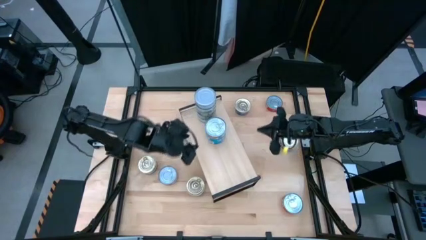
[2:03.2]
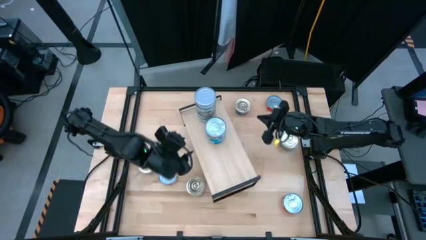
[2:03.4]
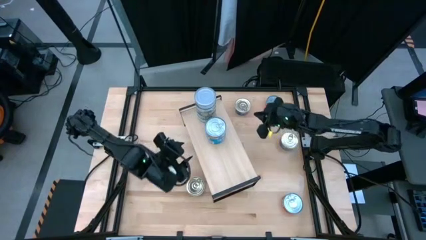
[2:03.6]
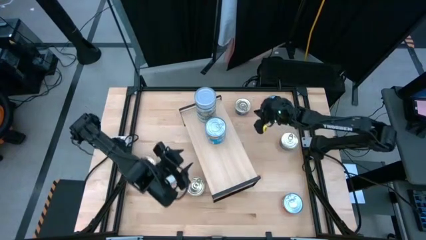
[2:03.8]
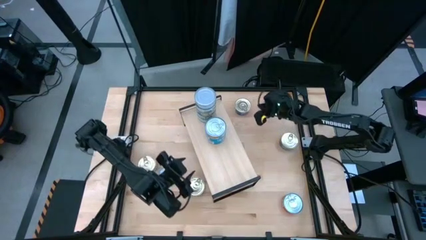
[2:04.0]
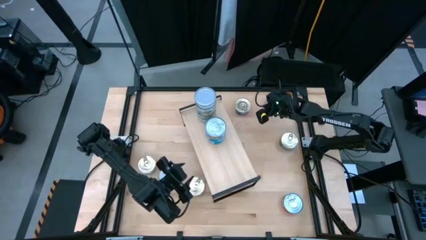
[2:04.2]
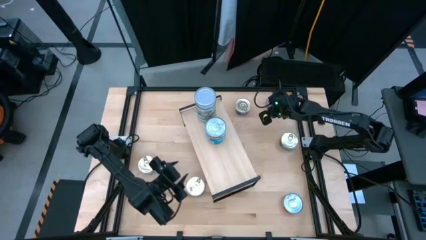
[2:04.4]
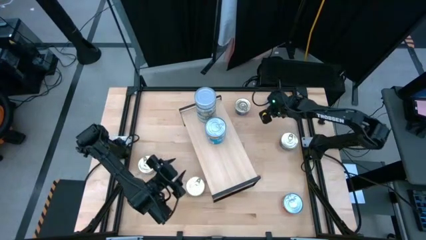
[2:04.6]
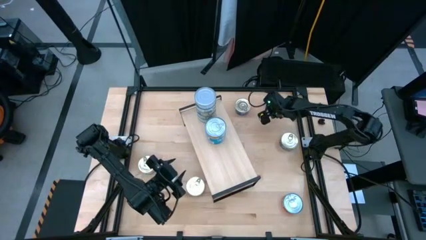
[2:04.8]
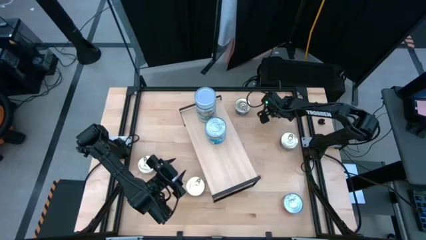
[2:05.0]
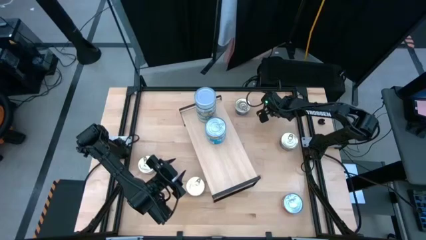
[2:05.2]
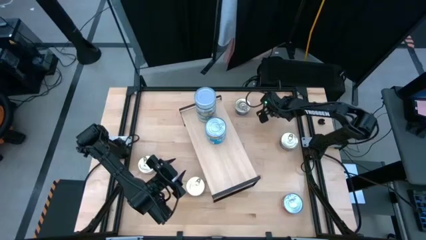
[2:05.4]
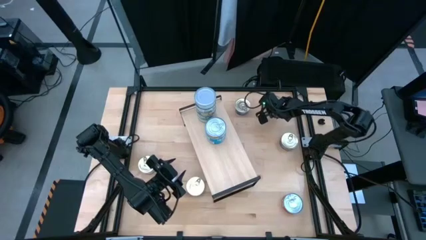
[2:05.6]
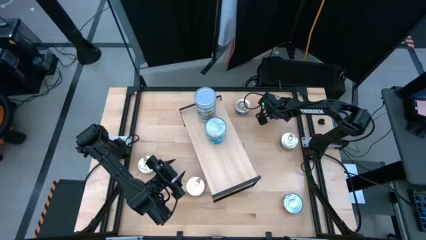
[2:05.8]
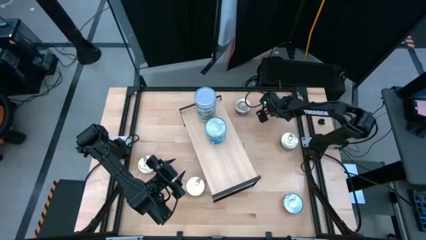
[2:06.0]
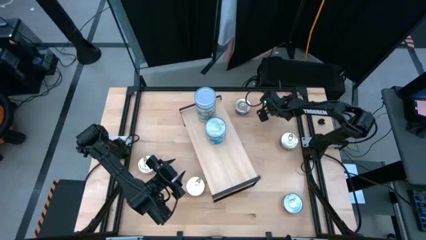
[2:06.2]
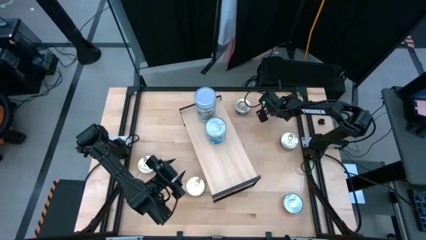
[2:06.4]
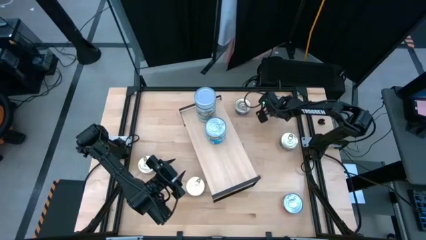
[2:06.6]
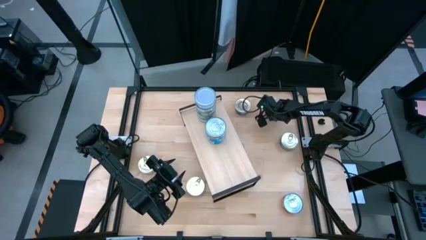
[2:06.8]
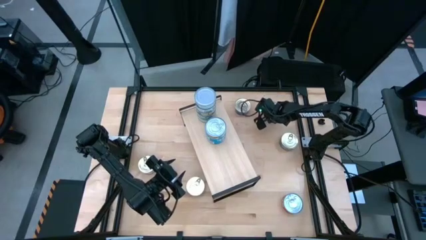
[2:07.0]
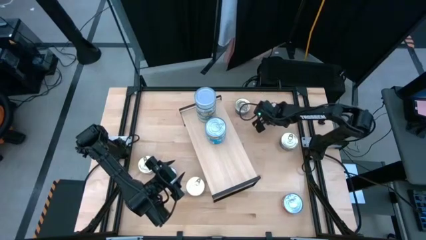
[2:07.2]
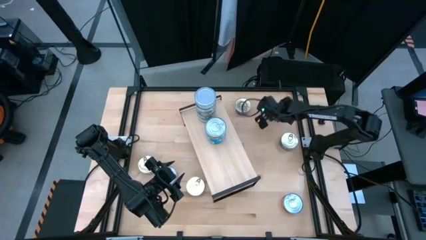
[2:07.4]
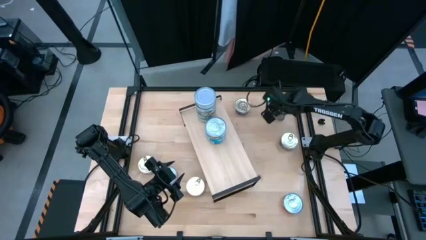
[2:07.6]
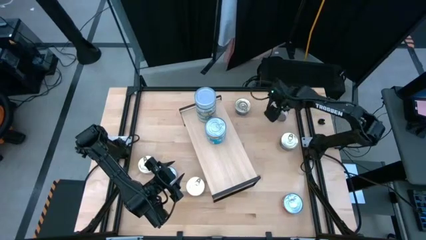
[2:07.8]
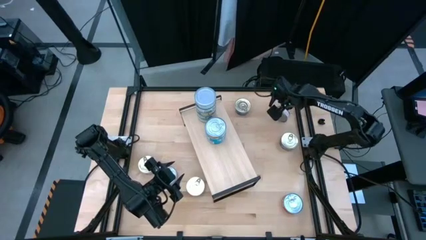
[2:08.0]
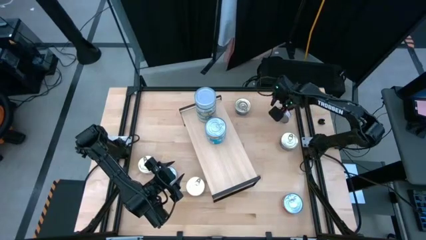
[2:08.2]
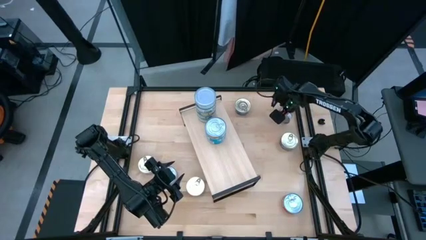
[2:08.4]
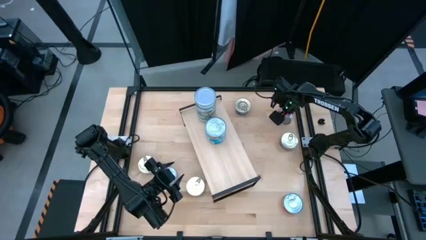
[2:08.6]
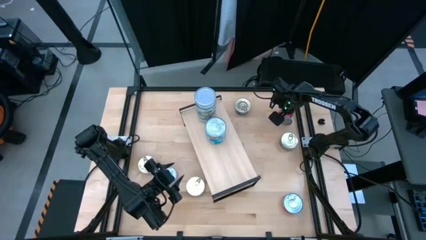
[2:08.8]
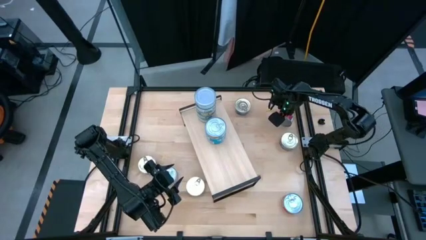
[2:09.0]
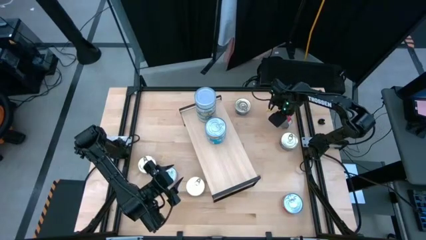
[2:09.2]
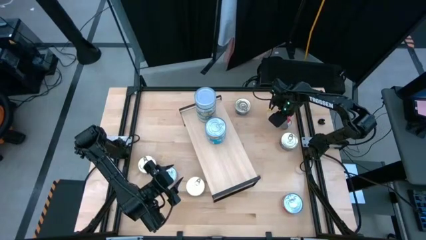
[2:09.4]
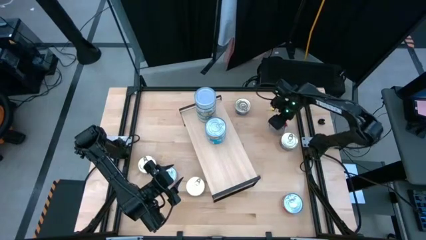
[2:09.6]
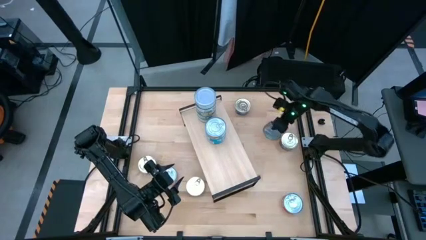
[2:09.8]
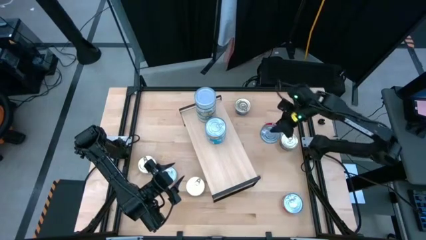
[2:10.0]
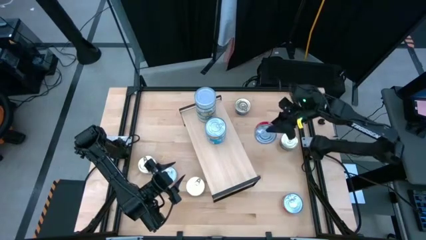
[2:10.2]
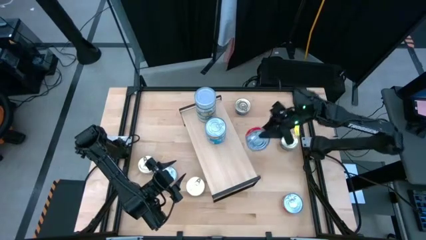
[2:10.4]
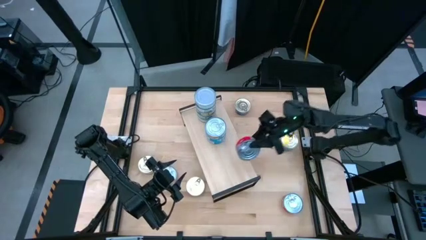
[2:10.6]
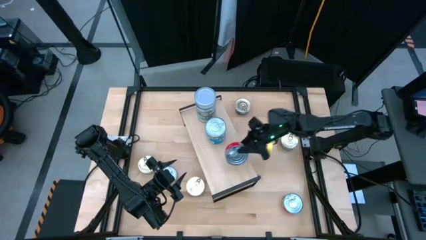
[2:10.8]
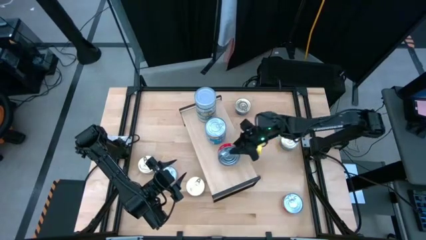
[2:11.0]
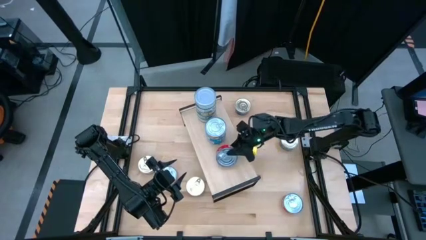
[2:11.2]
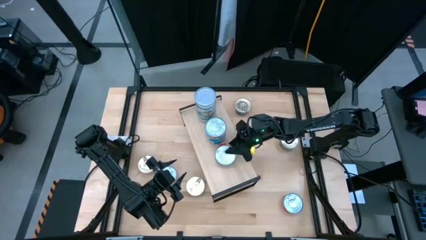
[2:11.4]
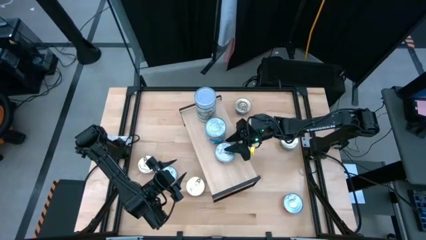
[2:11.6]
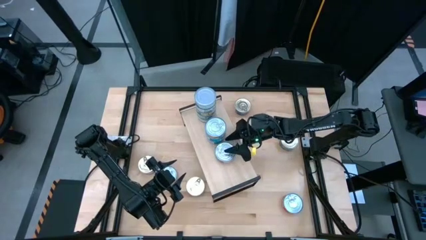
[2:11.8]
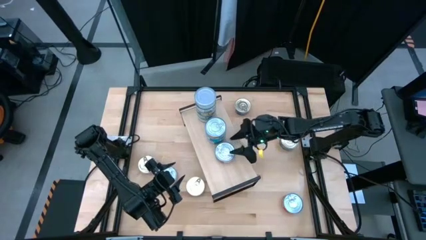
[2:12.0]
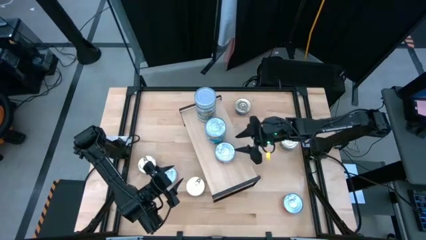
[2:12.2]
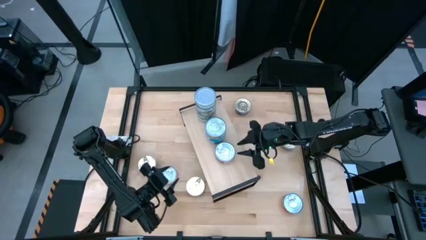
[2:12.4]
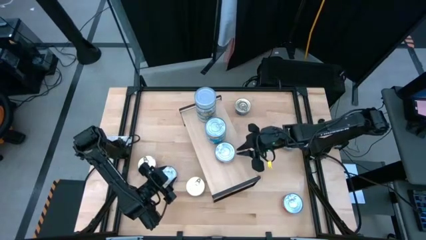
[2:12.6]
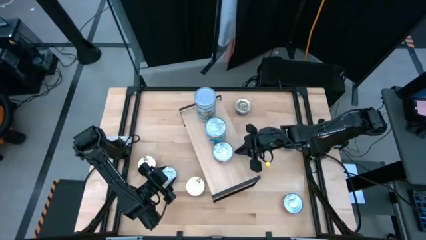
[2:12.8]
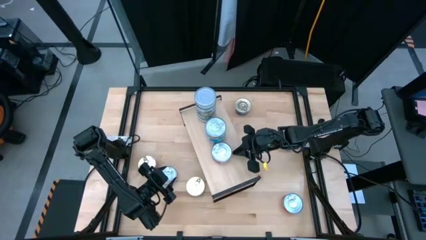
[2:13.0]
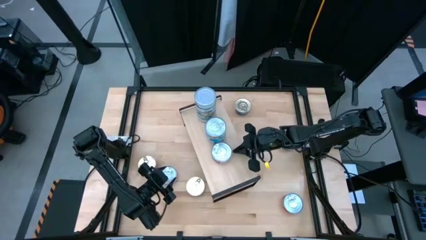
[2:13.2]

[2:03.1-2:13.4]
Task: Stack canned seafood by type on shelf
Put the top right red tuna can on the shelf

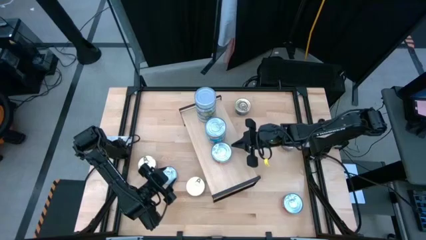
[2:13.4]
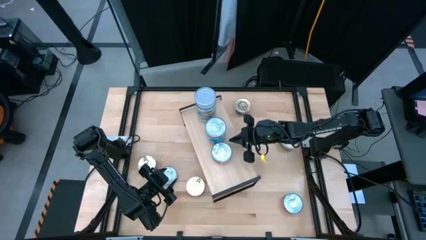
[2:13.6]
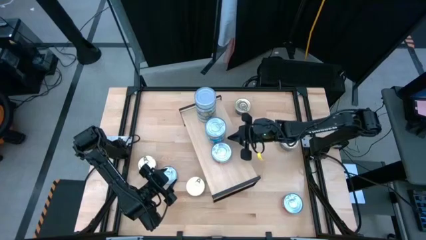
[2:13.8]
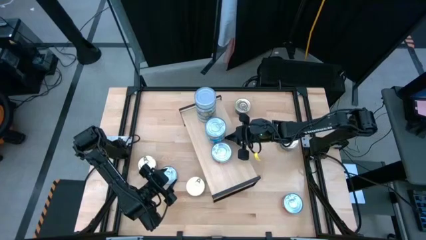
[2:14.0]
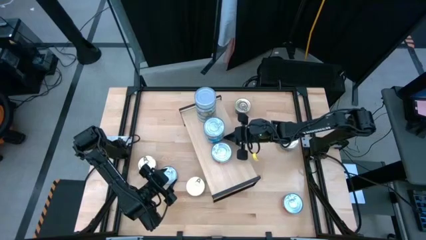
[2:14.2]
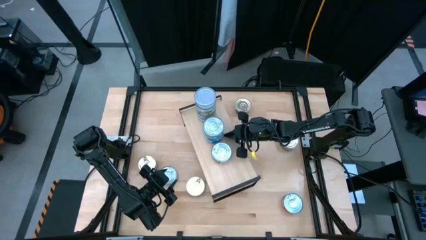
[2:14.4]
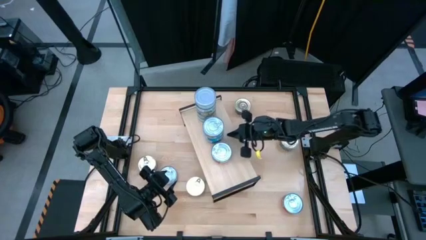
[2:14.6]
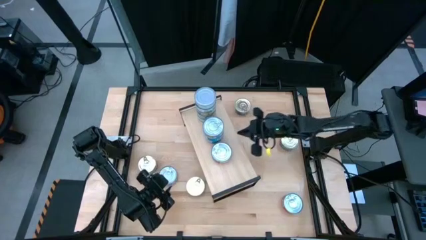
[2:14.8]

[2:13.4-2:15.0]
Adjust the light blue tuna can

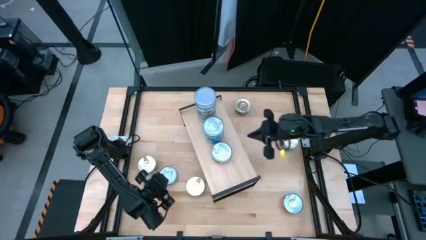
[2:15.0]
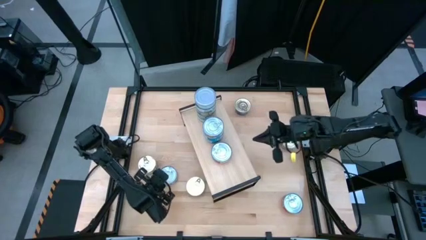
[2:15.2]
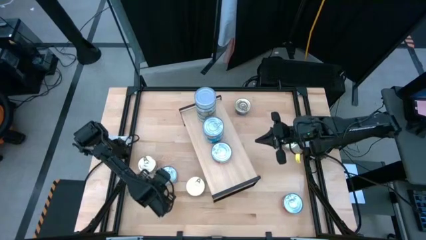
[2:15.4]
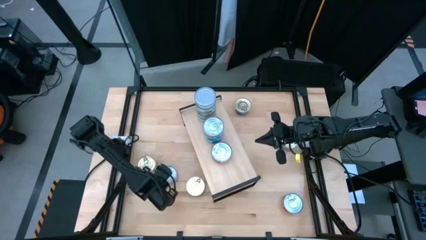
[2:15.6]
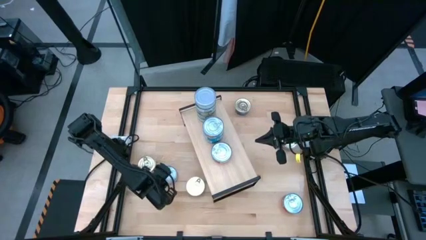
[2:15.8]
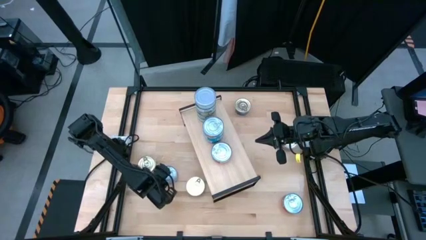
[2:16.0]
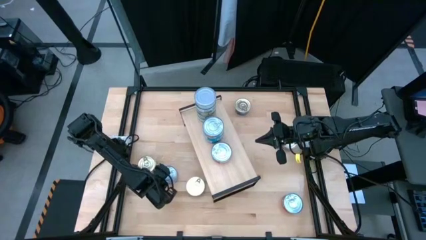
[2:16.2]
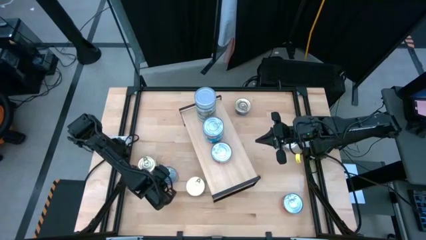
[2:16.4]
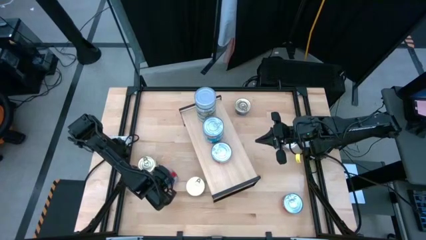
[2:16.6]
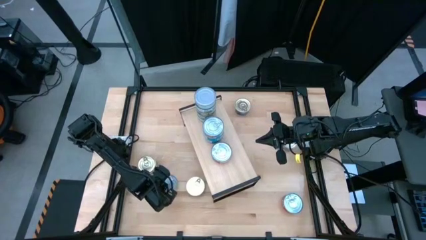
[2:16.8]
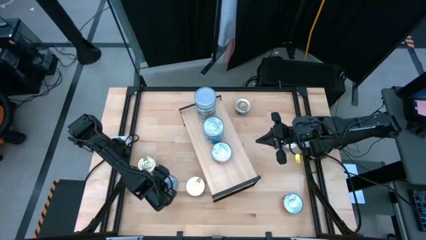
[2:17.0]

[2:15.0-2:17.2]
Stack the left red tuna can on top of the other red tuna can on the shelf
